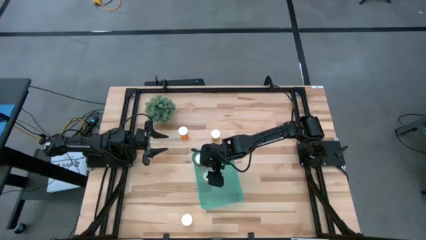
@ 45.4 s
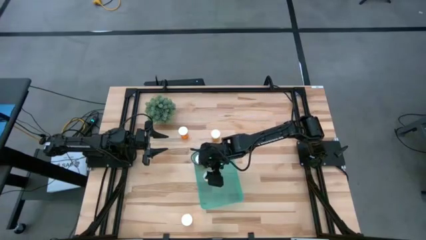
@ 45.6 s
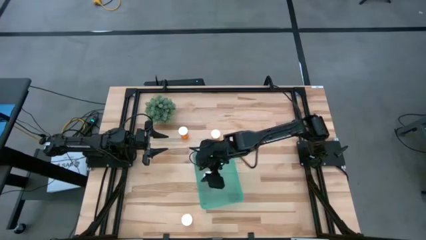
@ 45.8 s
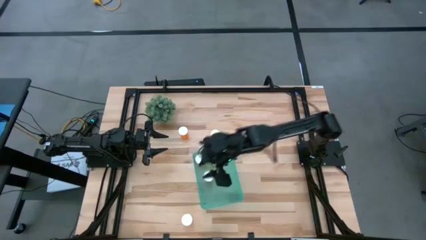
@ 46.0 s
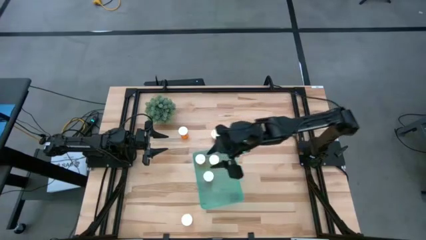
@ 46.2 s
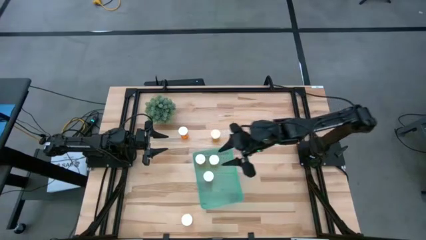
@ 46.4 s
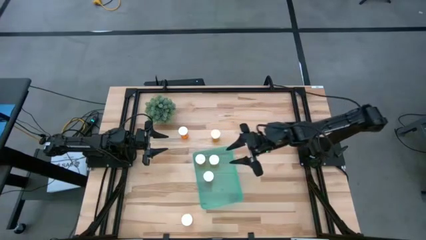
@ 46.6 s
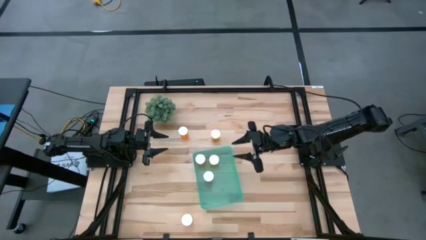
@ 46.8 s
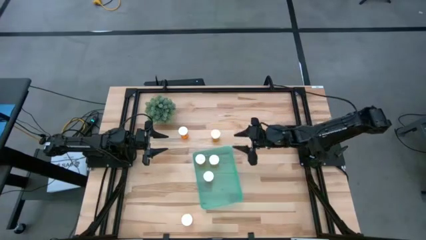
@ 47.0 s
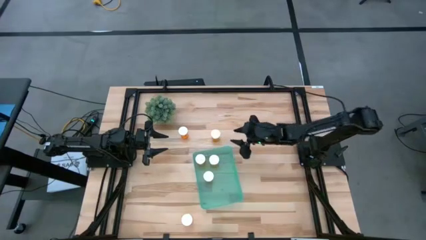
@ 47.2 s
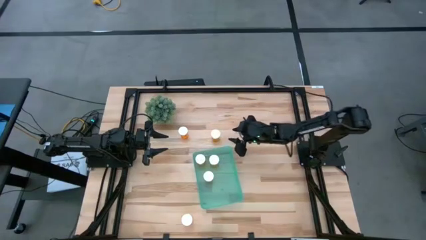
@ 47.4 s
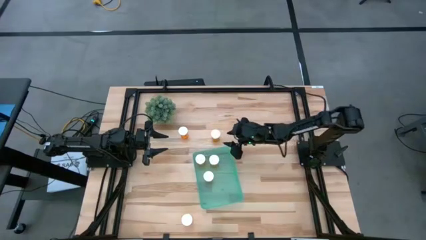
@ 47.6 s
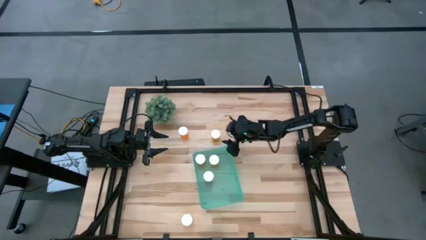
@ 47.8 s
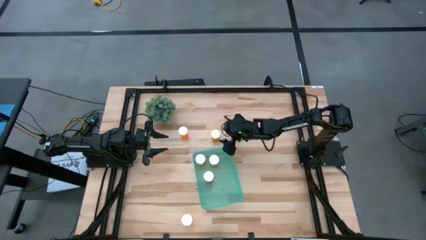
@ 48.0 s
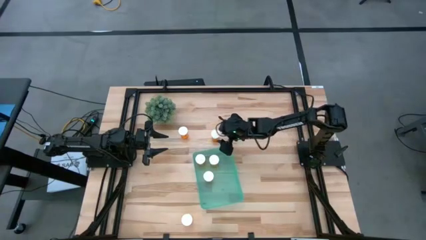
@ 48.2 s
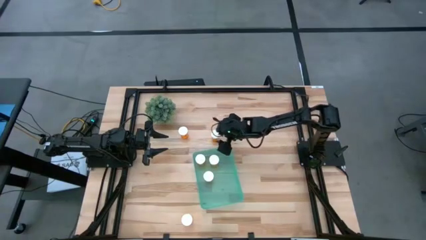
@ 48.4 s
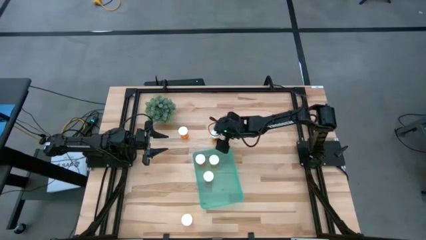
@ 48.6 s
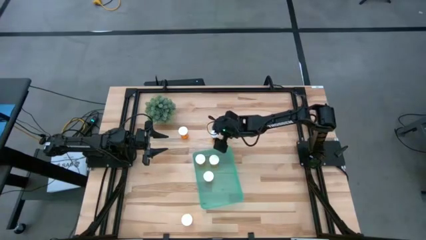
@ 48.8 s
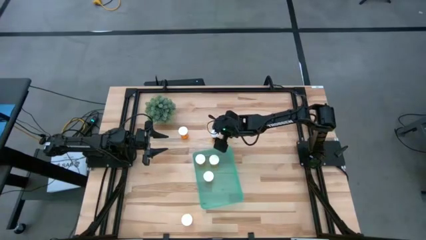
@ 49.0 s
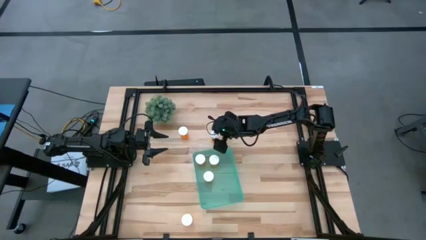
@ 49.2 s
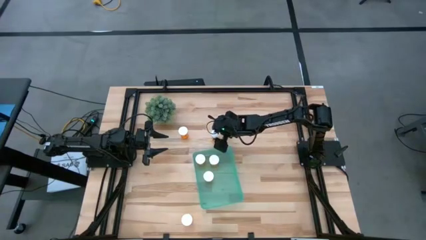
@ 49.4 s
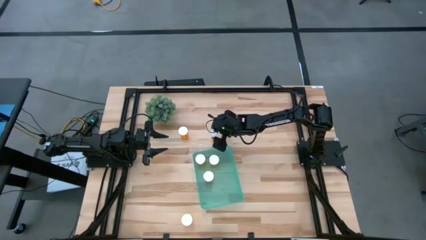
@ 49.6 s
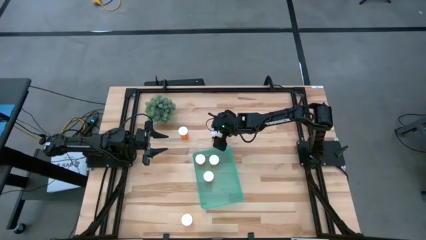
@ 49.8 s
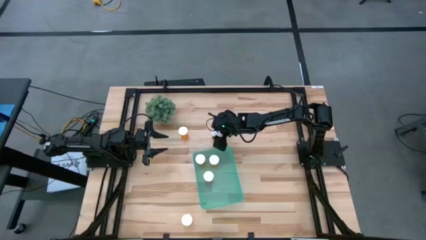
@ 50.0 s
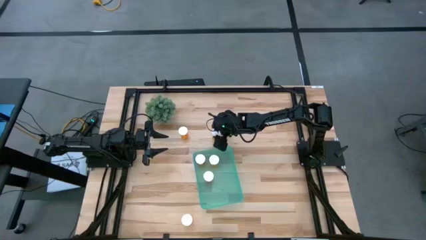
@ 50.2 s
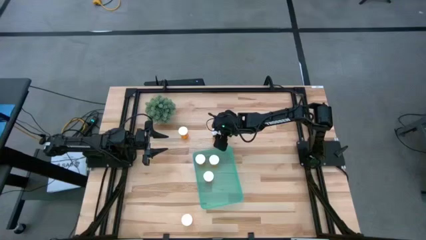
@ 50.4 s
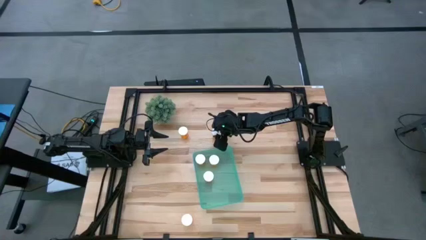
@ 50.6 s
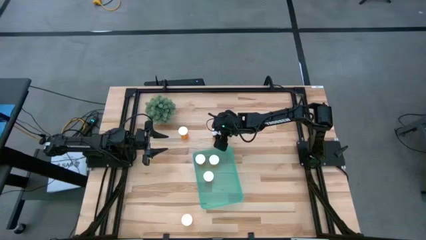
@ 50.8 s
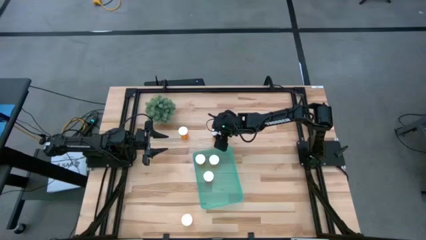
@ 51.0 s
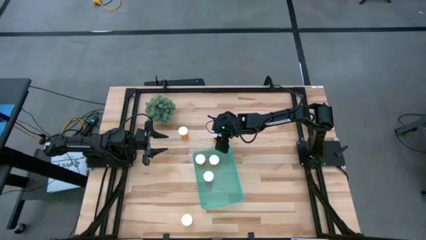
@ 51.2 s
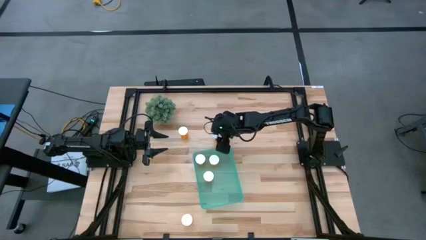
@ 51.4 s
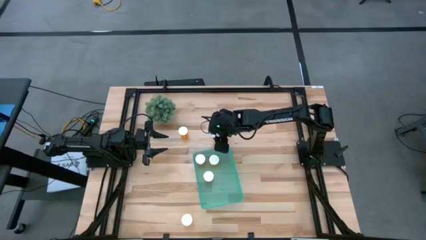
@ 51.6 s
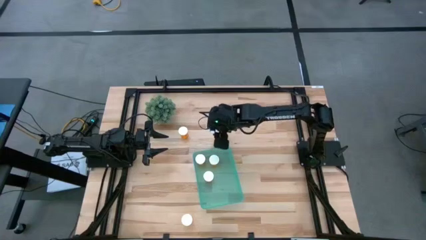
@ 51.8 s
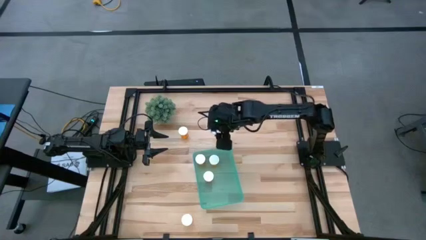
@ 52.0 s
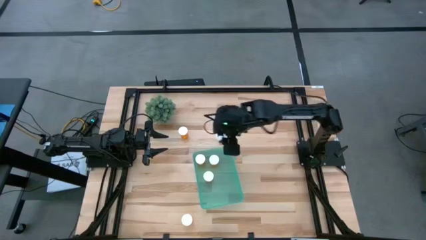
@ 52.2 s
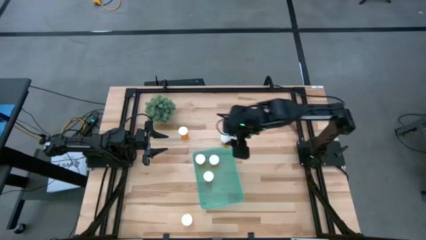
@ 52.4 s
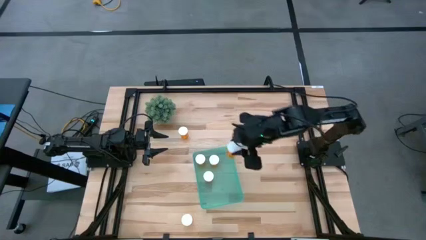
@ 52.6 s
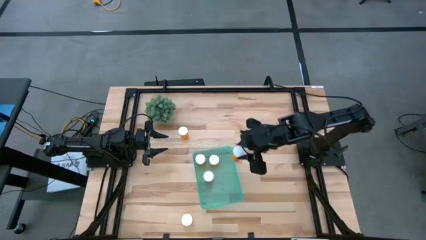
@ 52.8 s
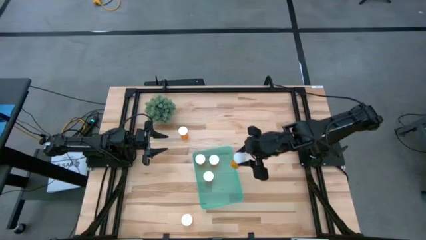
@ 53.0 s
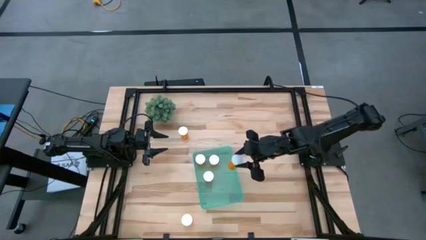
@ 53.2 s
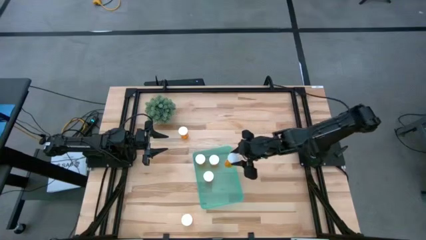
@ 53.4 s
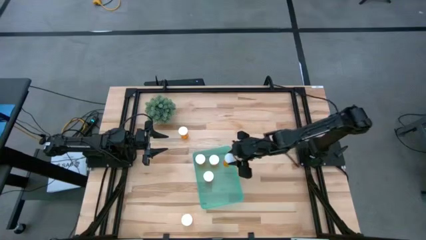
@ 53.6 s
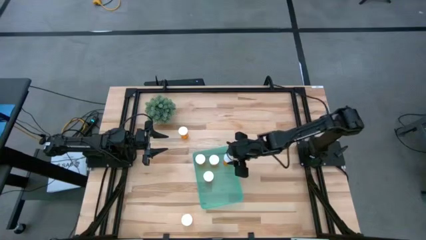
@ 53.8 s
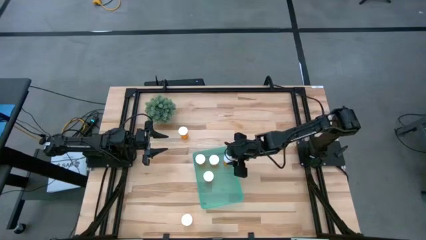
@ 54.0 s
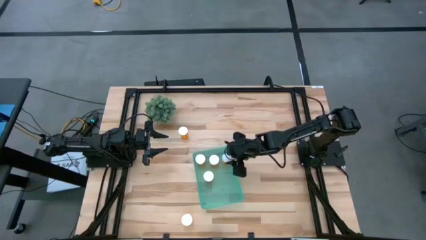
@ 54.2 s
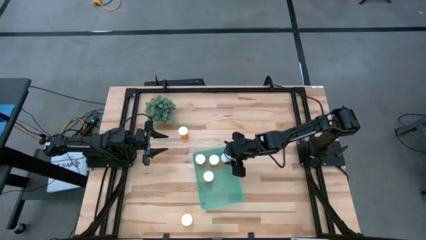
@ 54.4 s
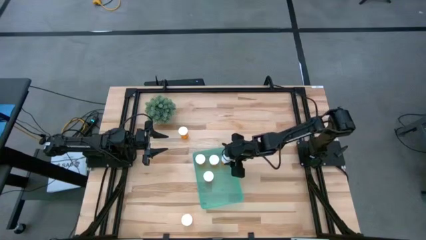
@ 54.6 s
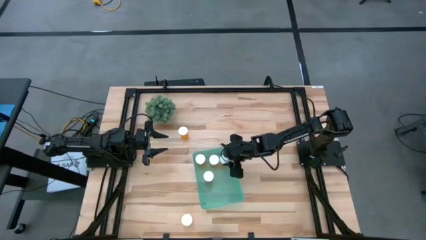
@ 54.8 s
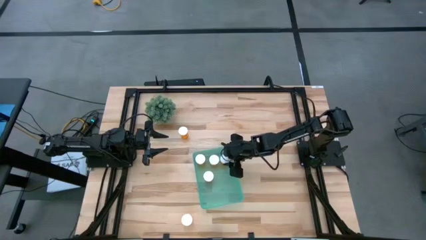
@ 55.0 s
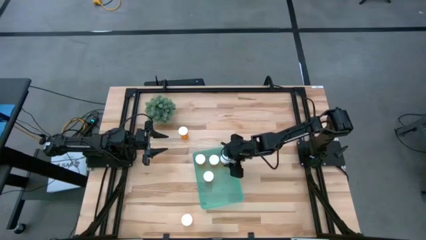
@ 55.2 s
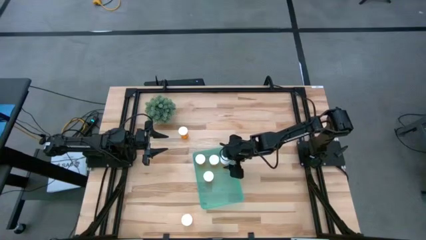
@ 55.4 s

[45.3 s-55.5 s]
Task: Pick and place pill bottles into a basket
Put the orange pill bottle into the green bin

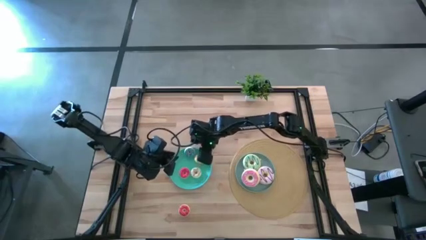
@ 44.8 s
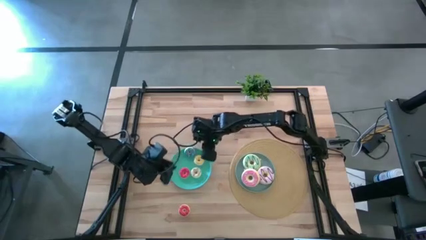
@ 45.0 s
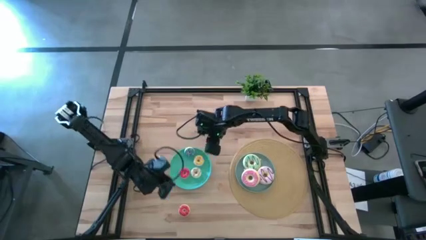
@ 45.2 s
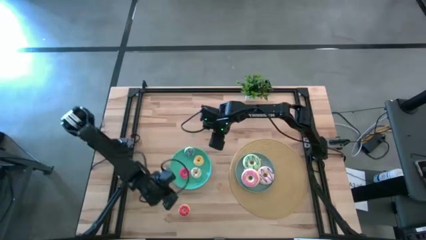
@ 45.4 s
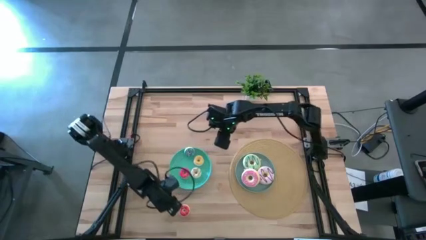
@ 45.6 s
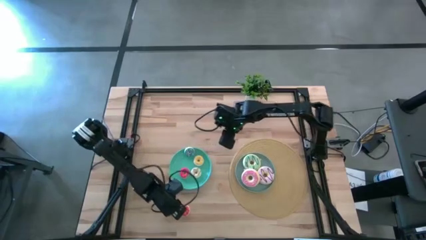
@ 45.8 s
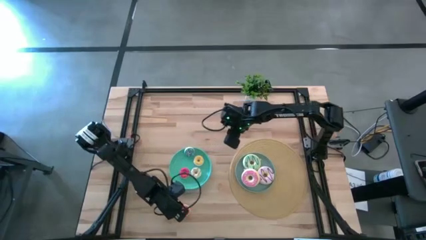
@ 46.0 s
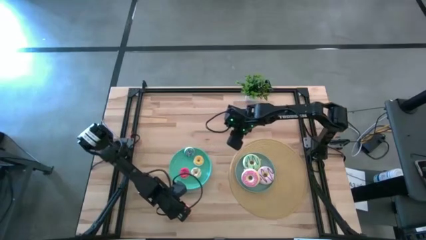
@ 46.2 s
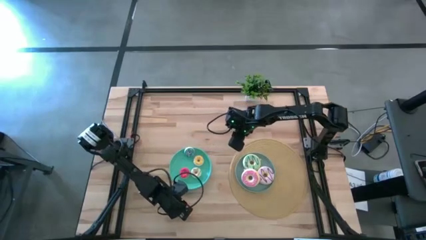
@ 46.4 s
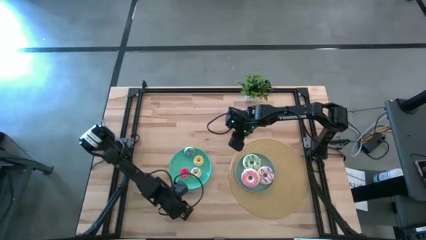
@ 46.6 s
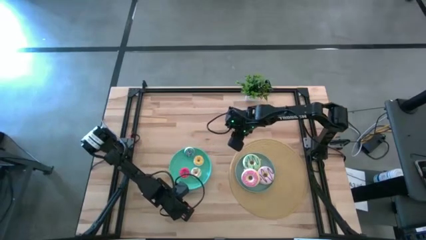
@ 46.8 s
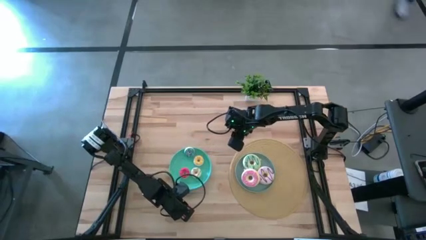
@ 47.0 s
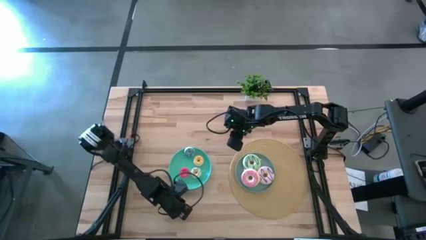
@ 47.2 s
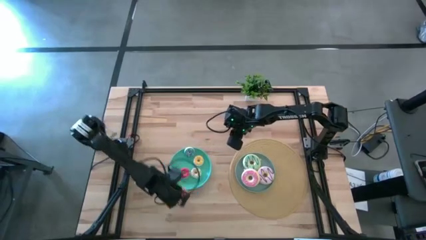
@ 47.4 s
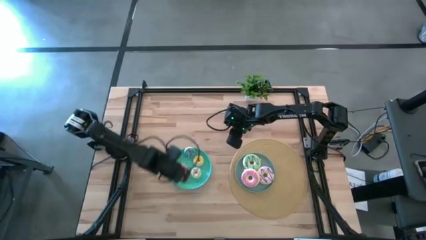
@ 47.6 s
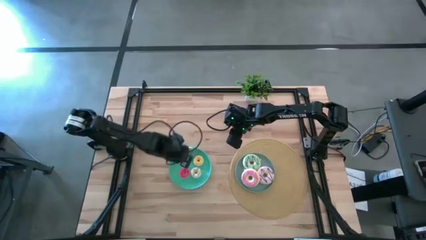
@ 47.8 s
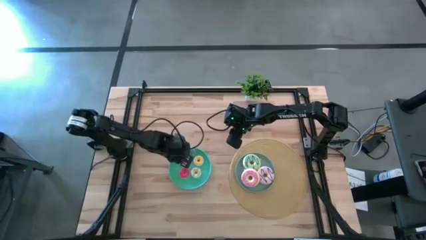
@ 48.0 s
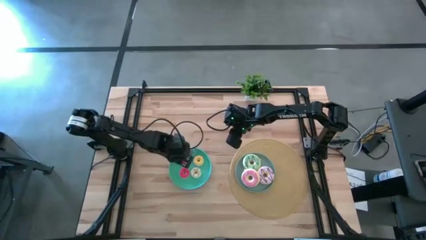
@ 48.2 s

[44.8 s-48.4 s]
Task: Pick & Place donuts
Put the small orange donut on the green plate

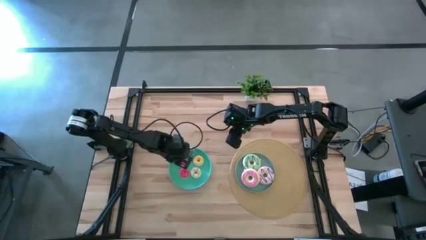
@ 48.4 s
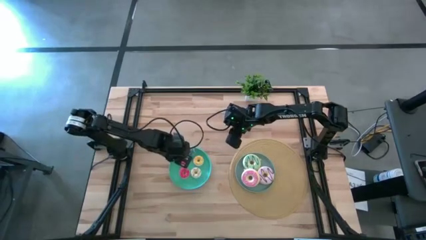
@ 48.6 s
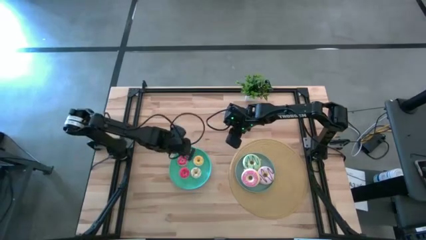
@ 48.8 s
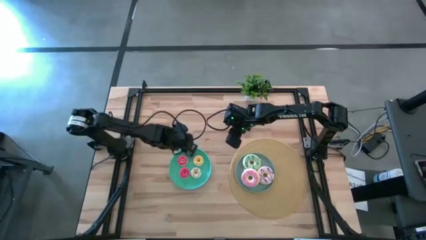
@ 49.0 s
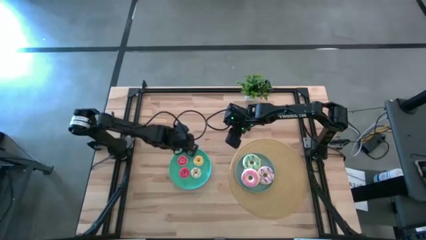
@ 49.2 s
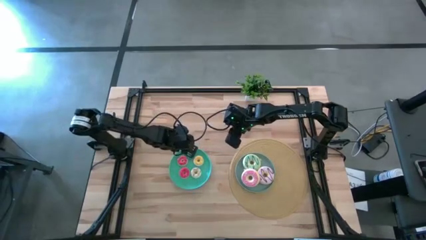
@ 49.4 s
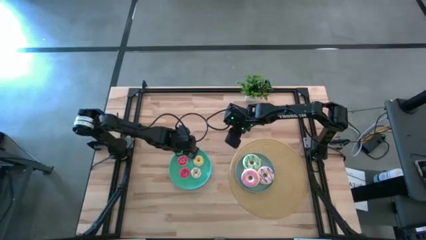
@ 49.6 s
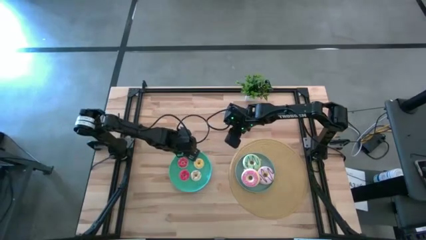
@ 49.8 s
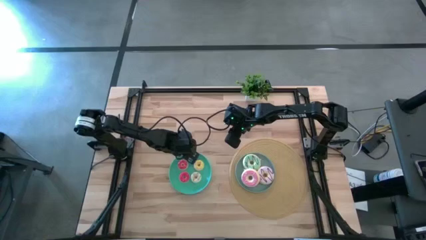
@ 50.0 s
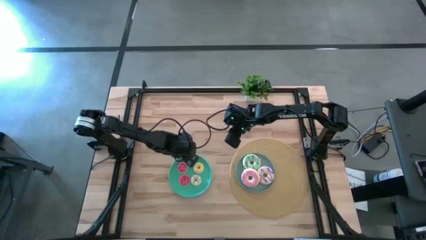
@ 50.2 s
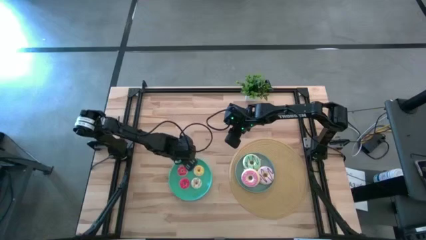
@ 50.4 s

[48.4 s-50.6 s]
Adjust the small blue donut on the green plate
